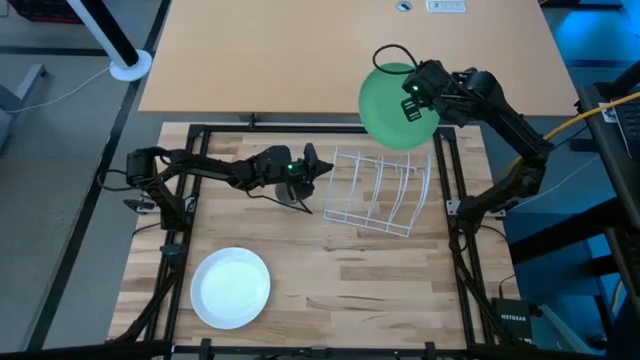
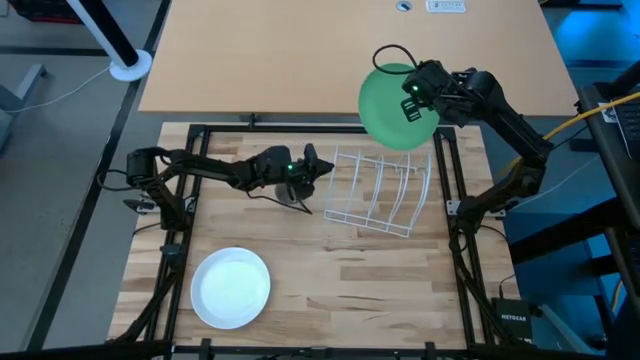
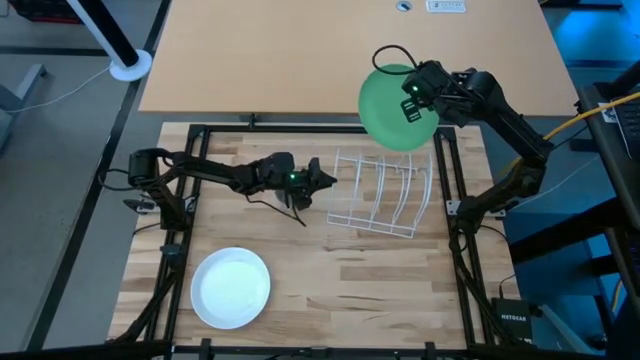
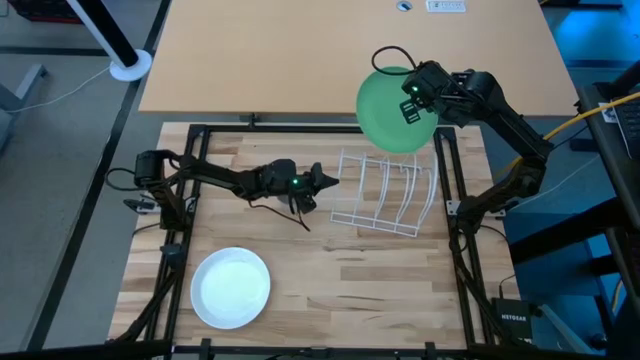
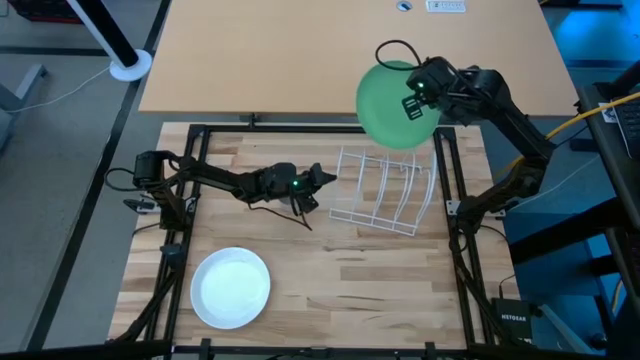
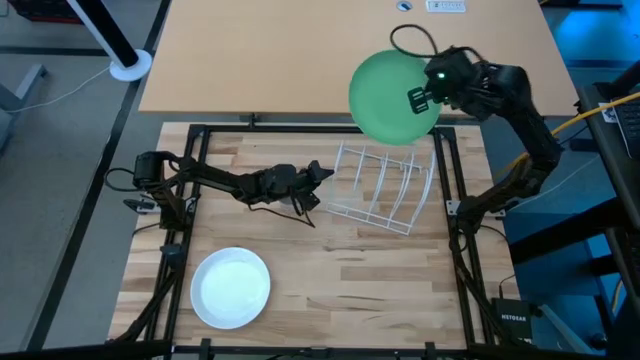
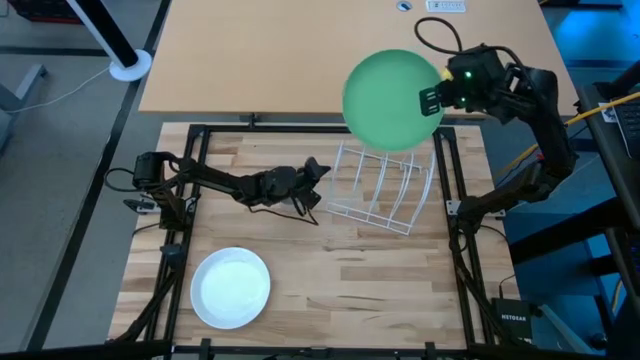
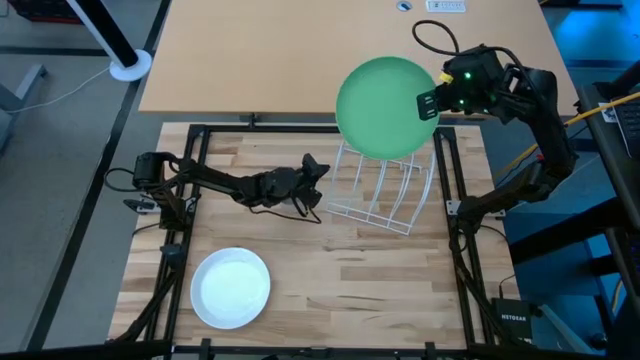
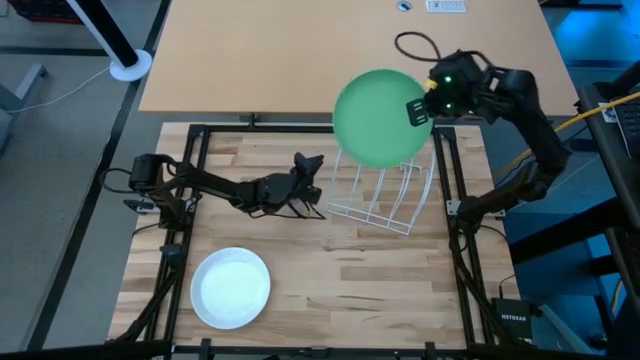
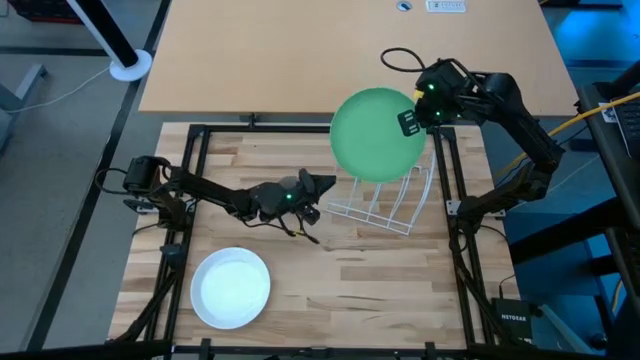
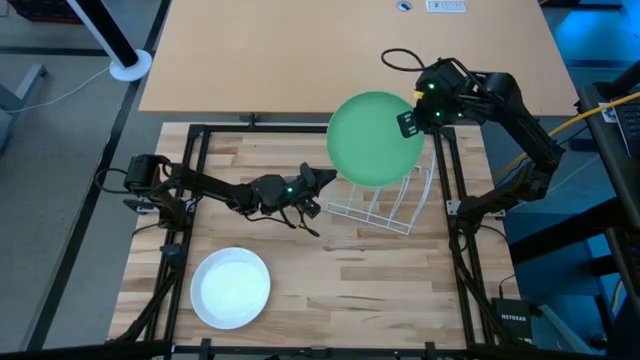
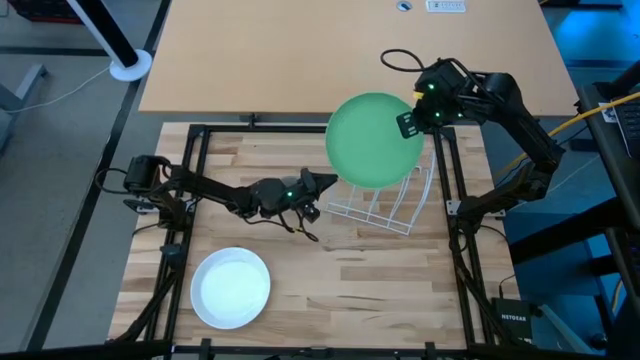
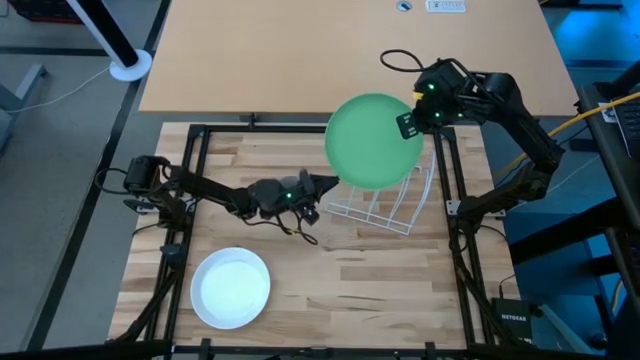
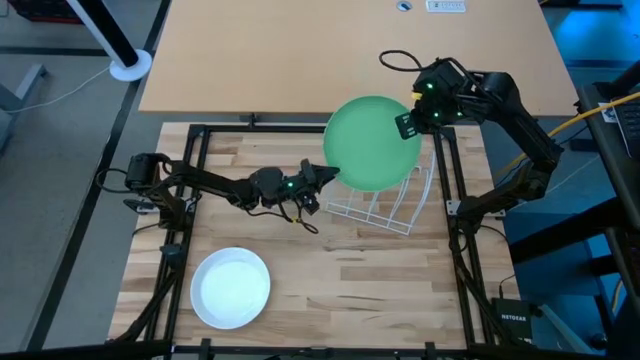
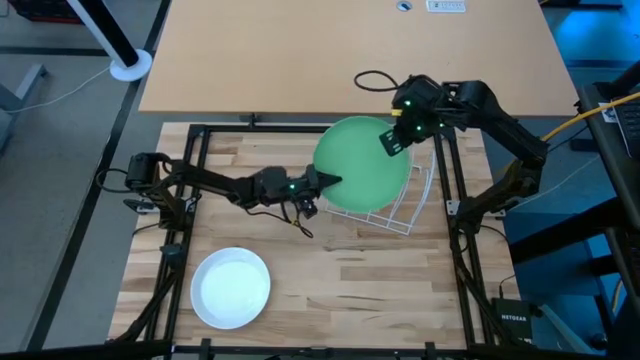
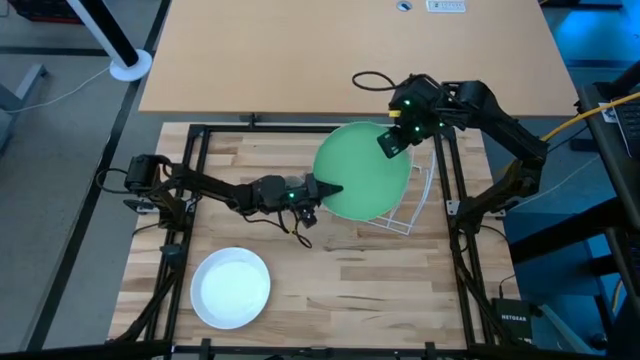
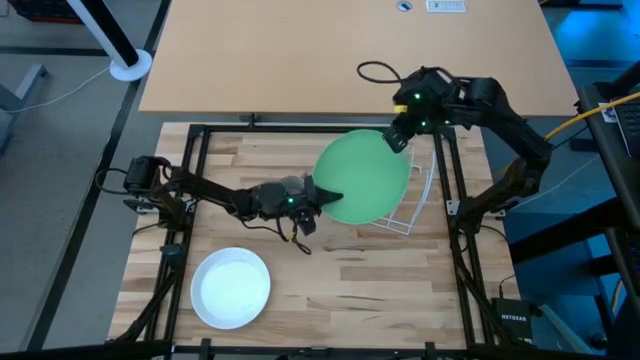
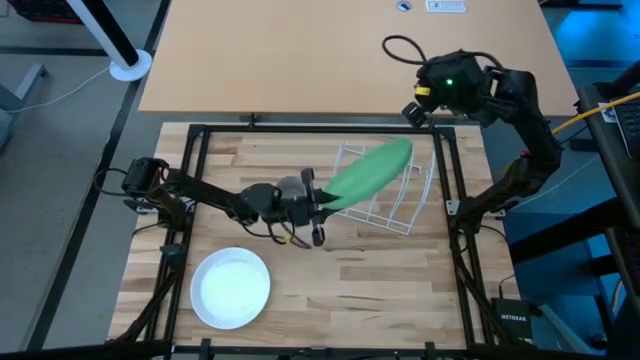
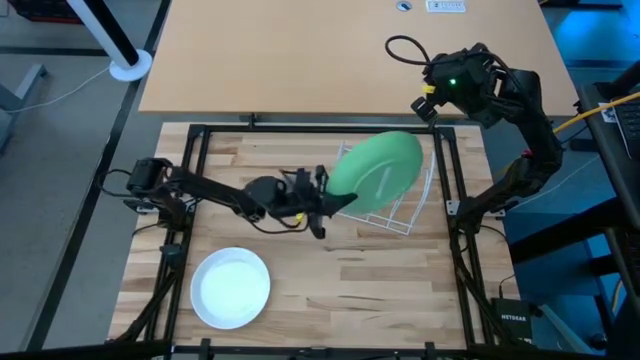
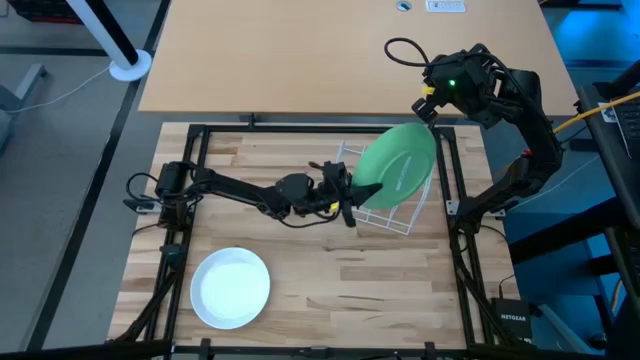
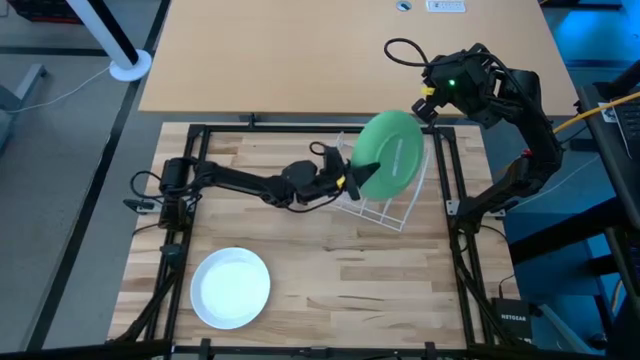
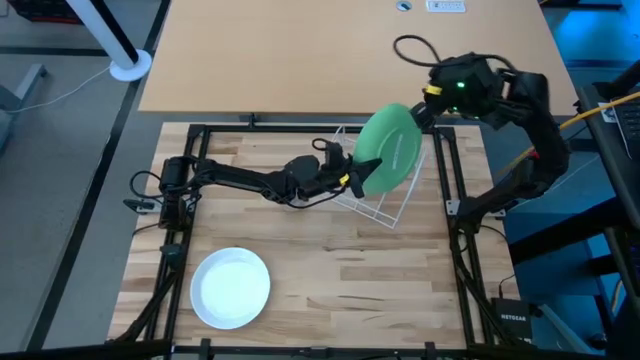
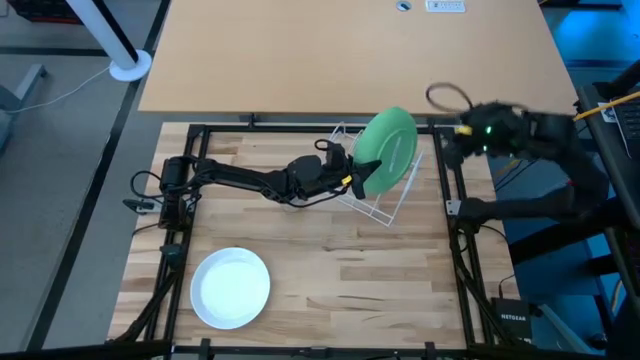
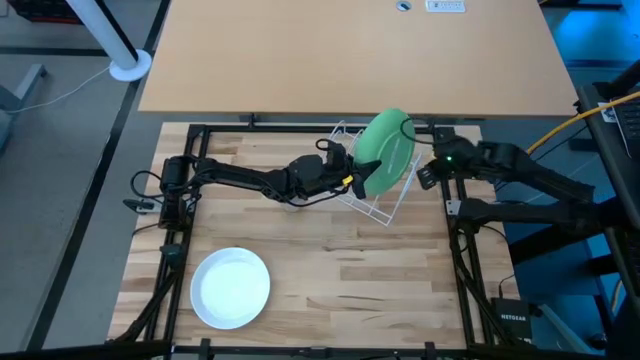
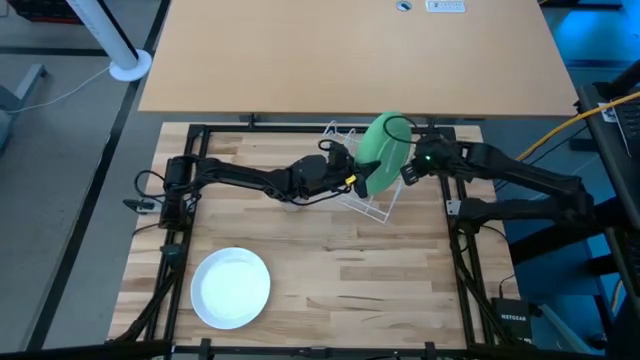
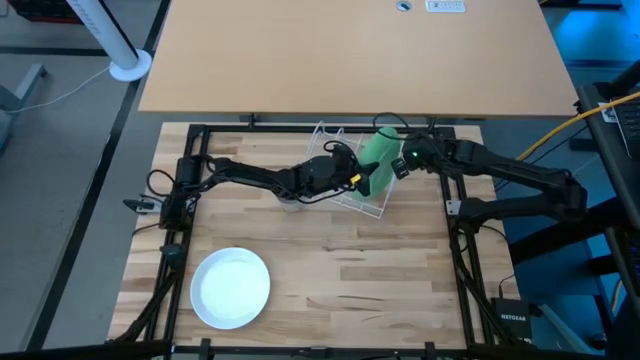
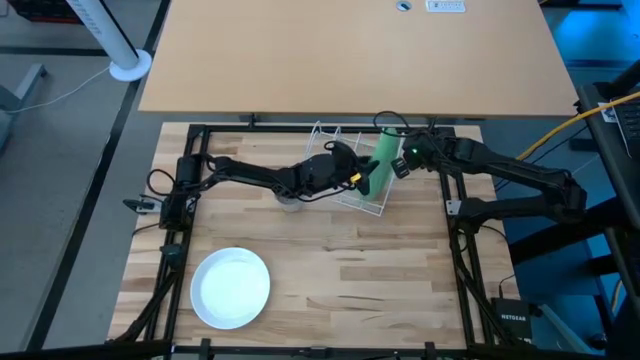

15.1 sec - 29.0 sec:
Task: Sort dishes
Put the green plate in the dish rack

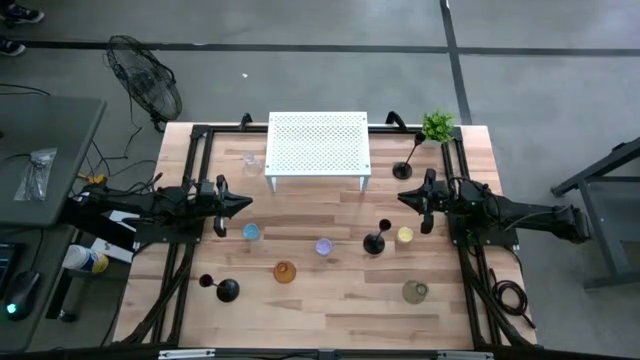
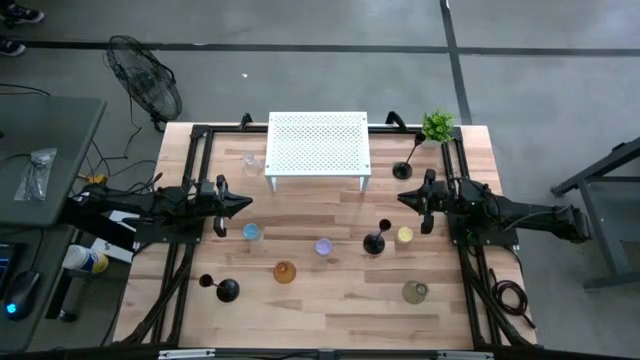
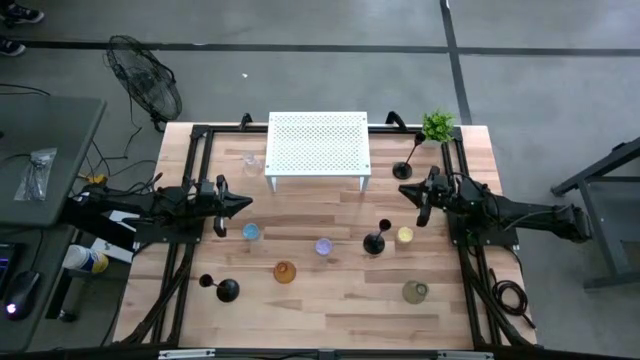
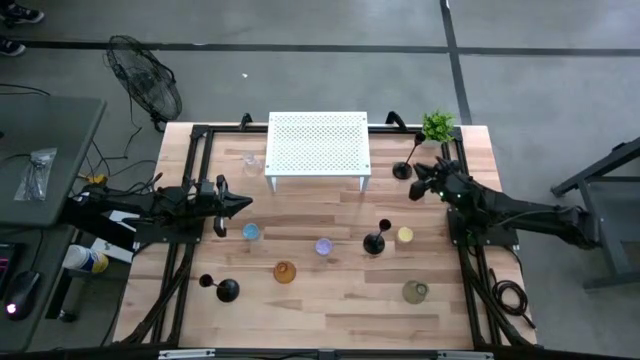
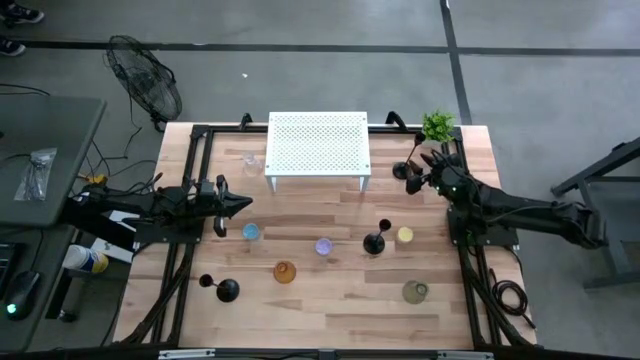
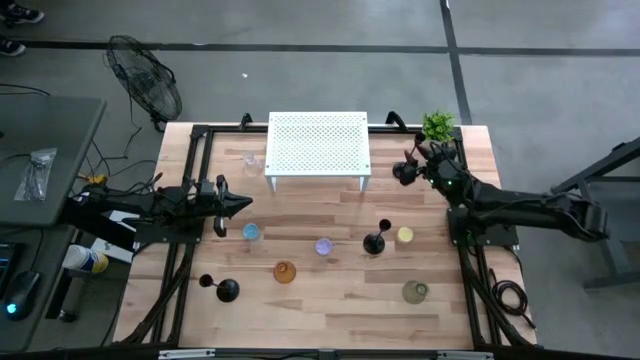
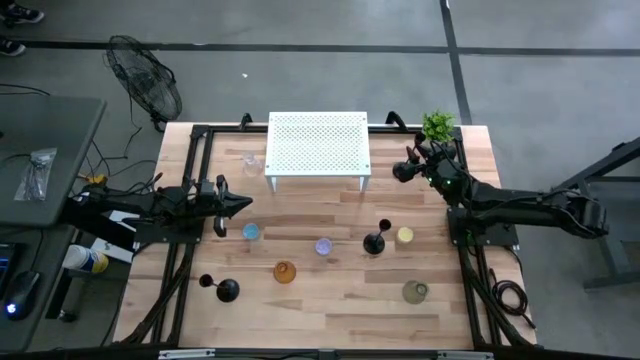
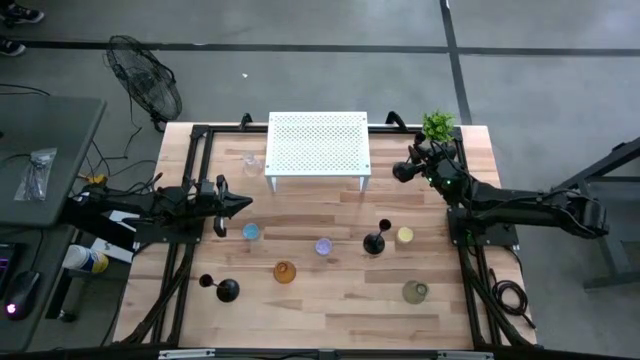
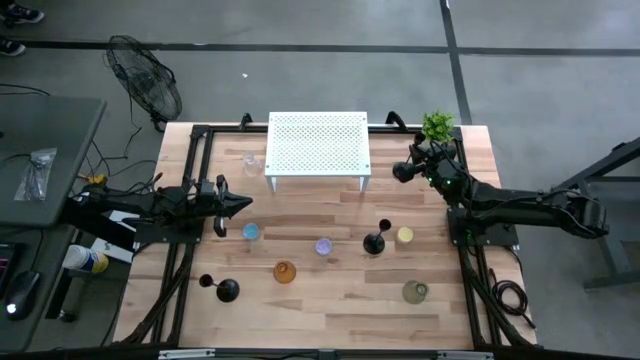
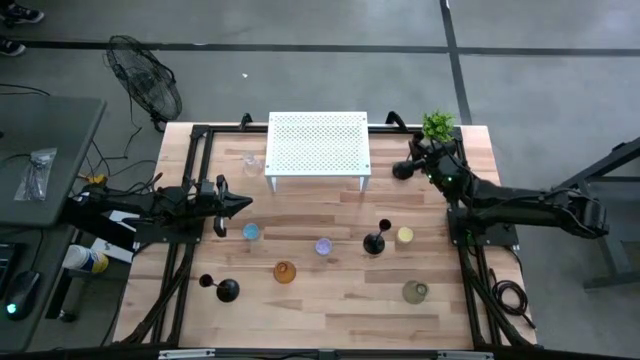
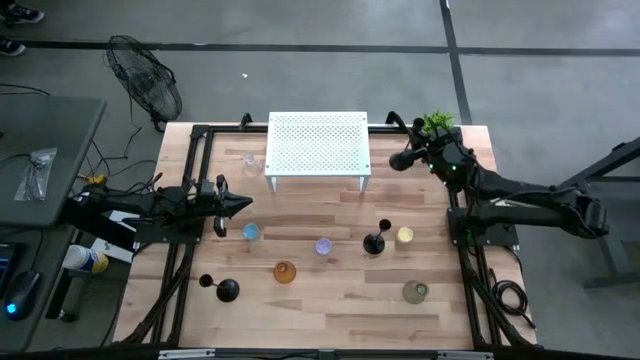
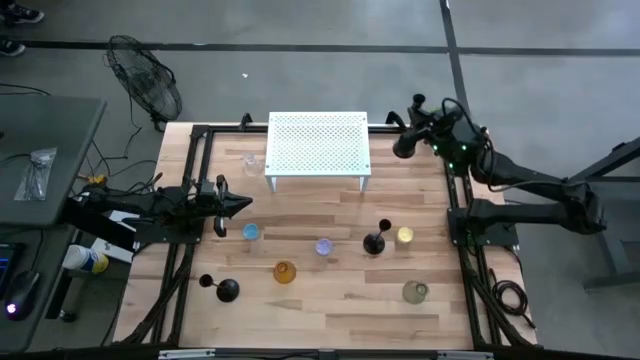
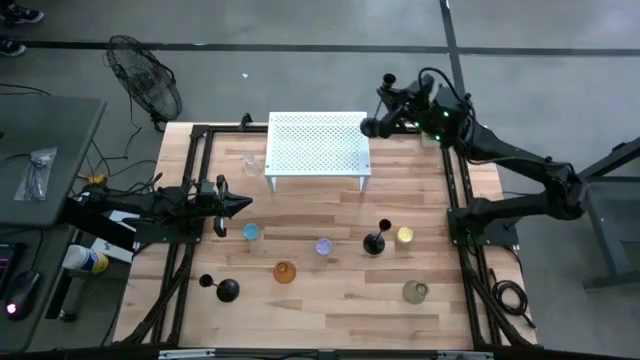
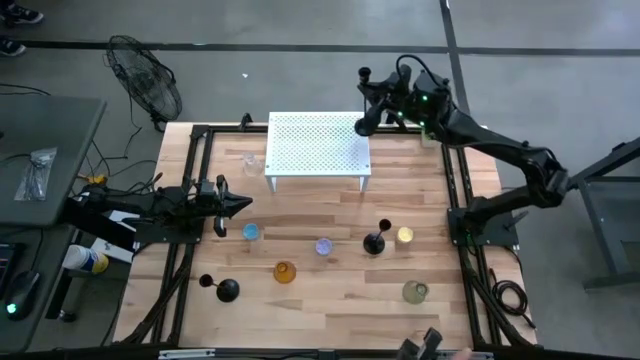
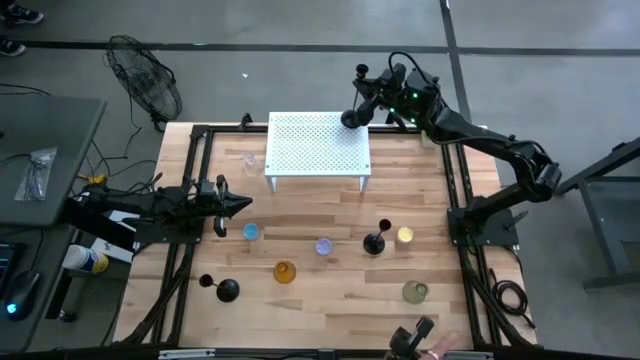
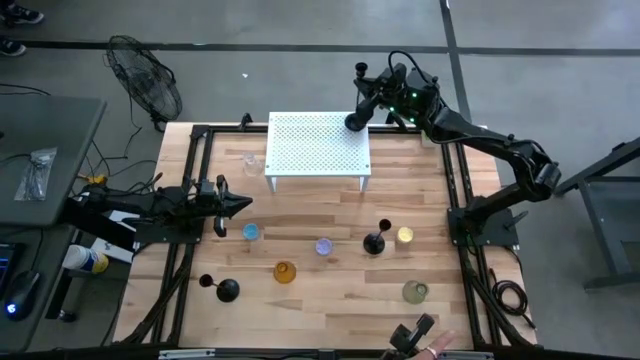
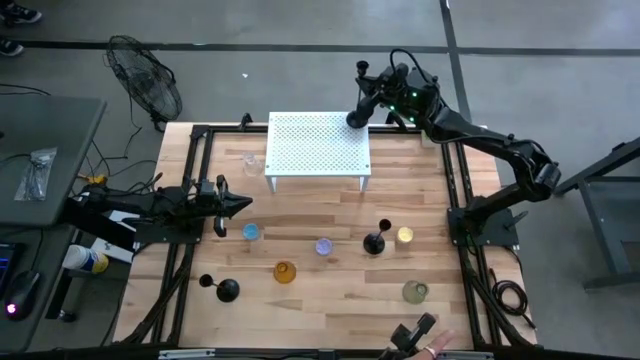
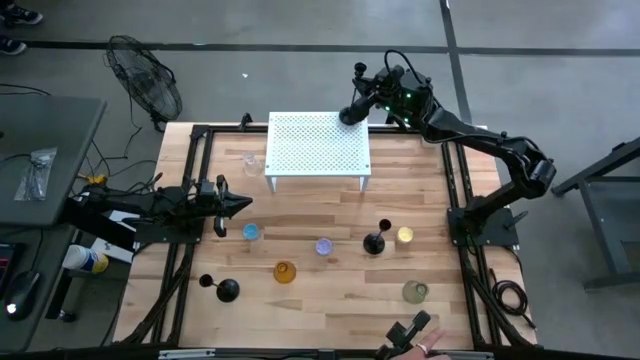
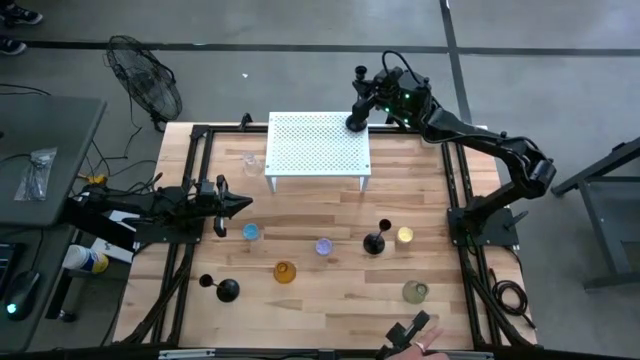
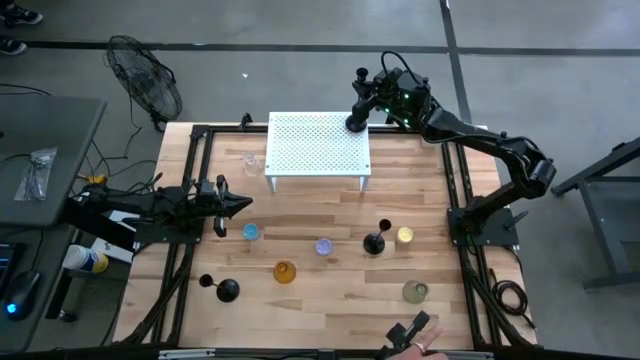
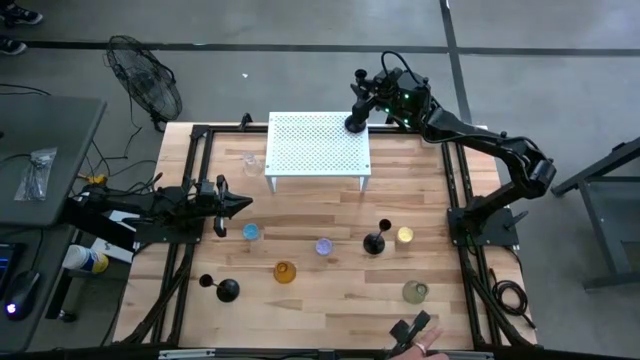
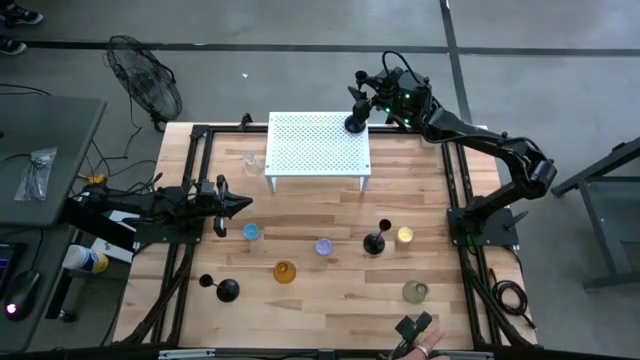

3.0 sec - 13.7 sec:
Task: Pick & Place candle stick holders
Put the top black candle holder on the shelf
